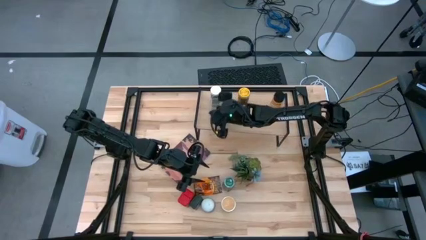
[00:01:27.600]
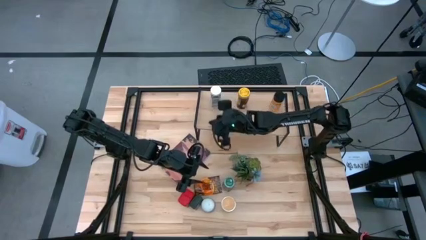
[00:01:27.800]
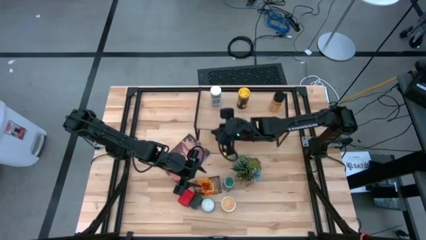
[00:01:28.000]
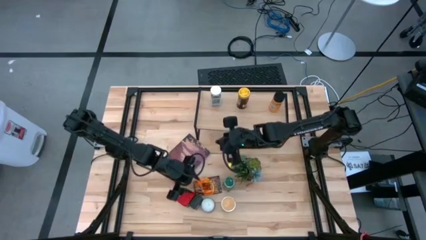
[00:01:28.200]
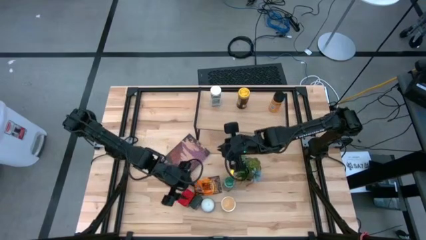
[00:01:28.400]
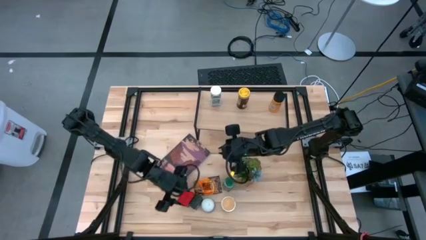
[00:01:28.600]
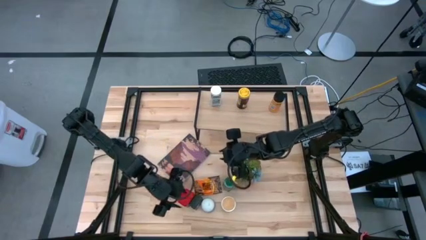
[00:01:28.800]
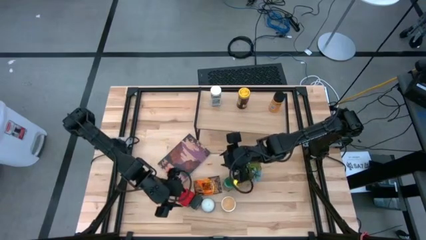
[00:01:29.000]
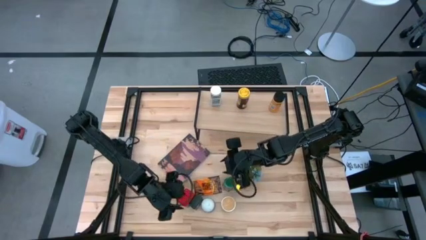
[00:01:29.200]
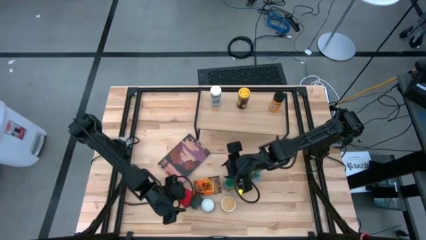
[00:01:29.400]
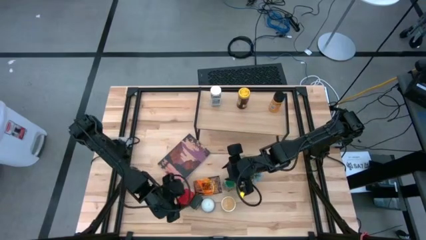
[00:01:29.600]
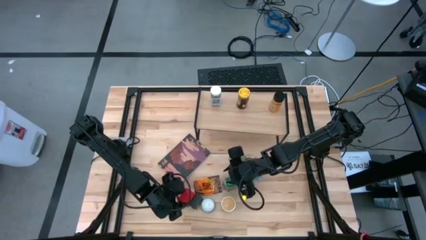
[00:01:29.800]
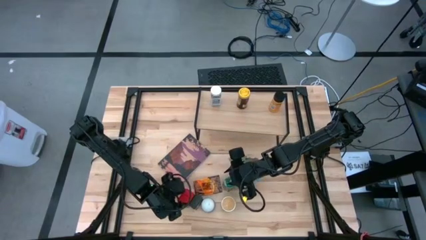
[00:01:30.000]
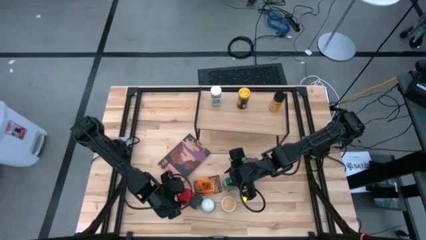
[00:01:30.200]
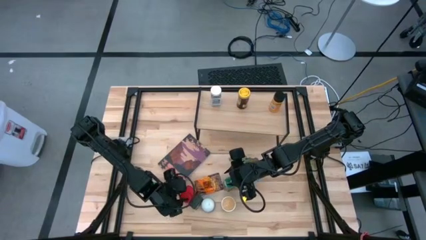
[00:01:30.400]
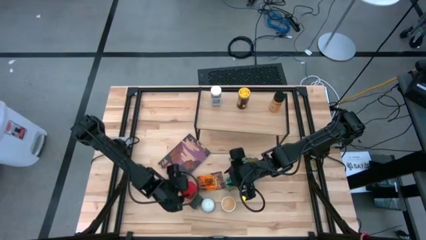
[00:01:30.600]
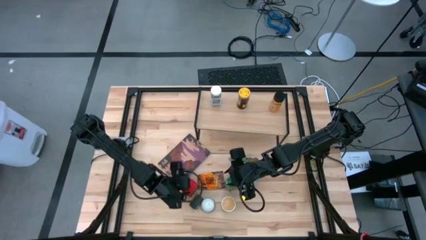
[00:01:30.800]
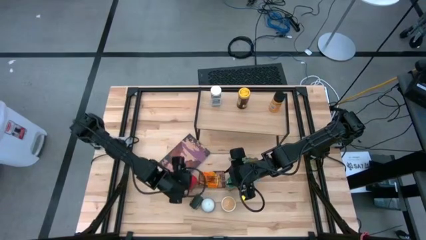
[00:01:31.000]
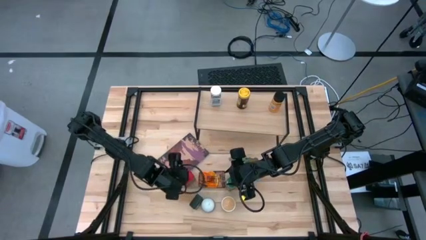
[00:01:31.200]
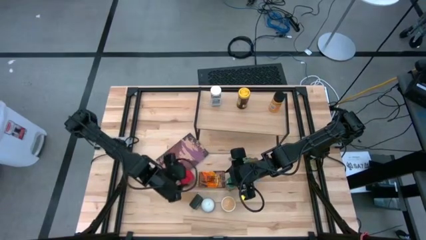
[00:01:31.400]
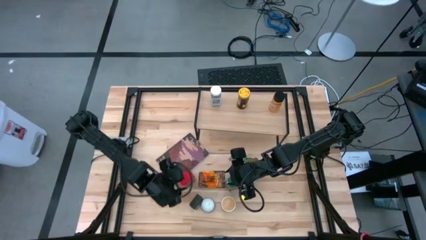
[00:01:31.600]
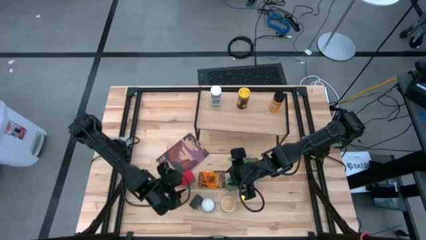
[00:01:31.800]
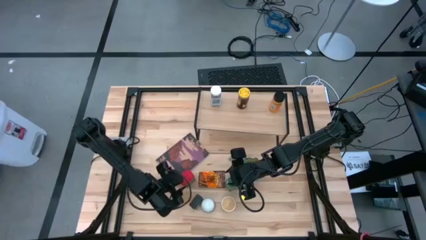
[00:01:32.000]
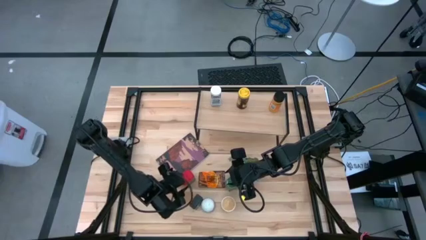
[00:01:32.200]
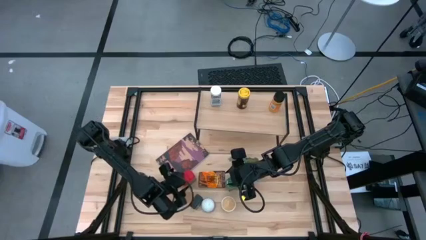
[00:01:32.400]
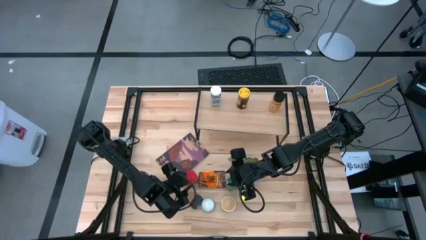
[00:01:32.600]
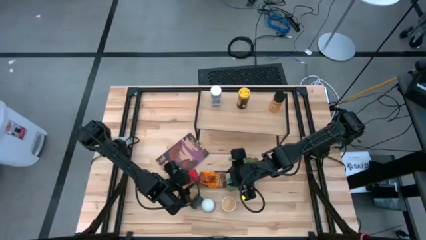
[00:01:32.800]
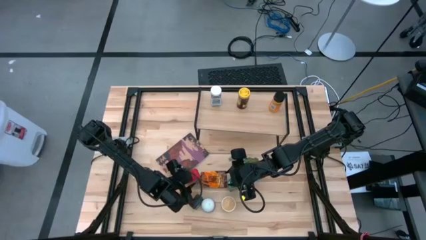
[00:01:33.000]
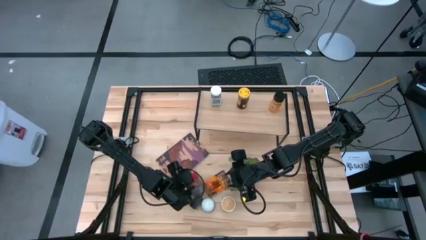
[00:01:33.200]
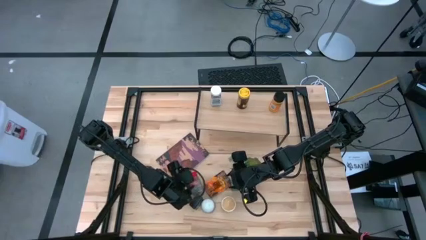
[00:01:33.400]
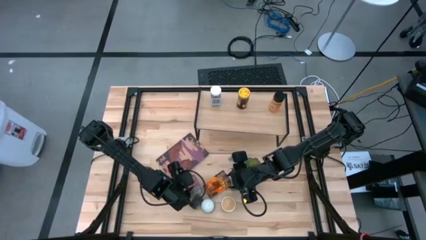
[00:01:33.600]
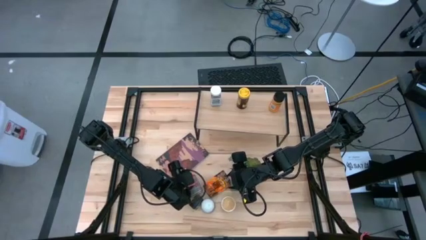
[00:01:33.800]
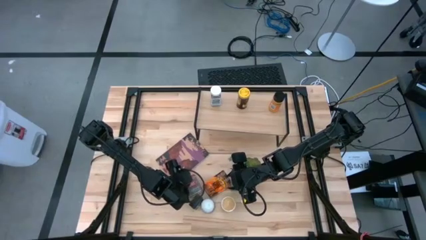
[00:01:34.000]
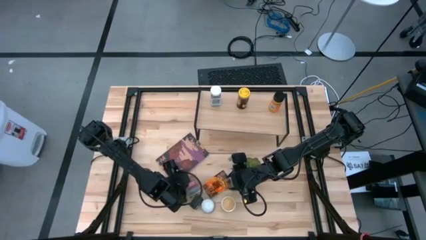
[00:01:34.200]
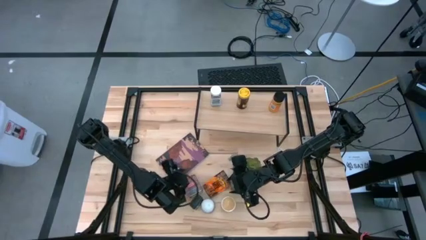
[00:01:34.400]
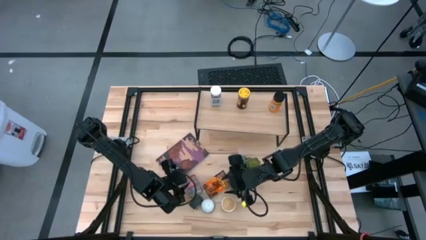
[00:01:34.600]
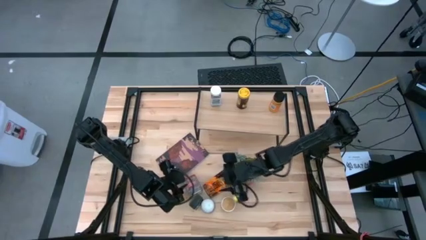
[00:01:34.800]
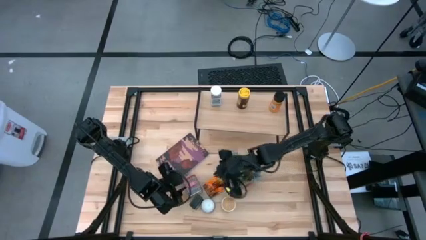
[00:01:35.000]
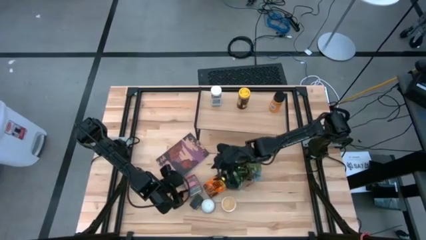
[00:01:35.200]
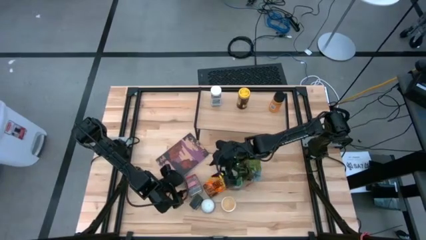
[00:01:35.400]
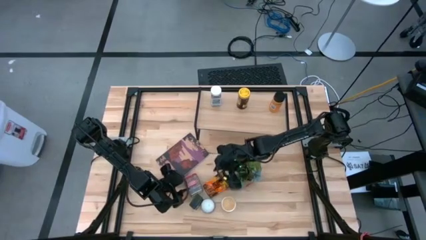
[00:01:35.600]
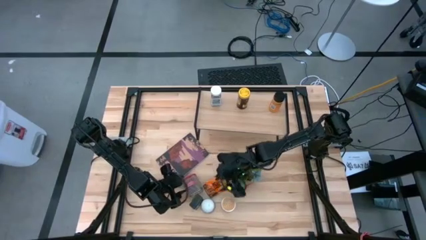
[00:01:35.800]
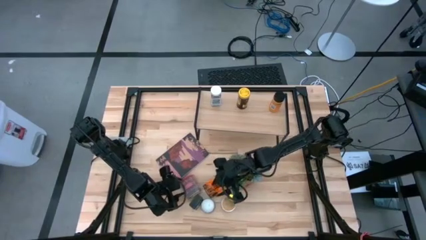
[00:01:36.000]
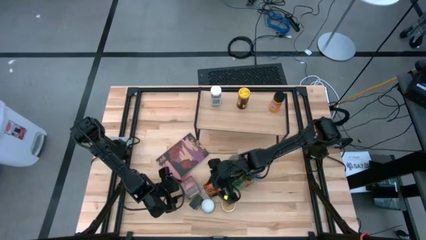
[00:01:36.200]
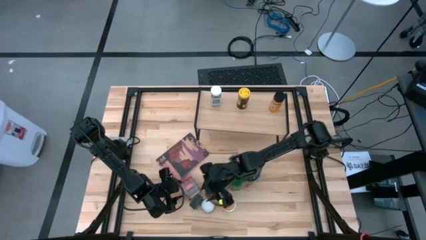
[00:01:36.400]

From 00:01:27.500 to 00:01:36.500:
Task: Shelf spices
Put the red seasoning can on the shelf

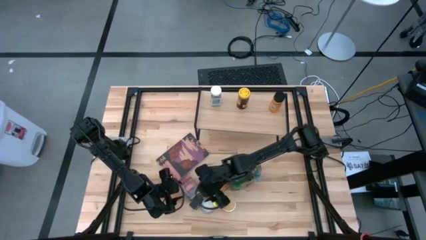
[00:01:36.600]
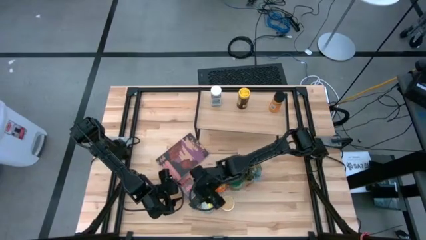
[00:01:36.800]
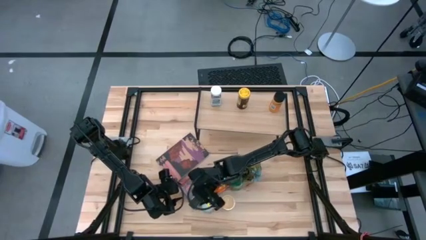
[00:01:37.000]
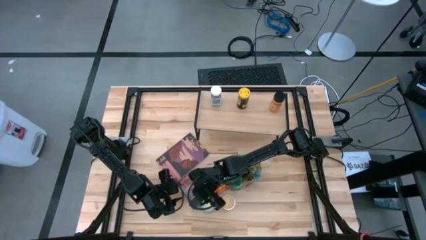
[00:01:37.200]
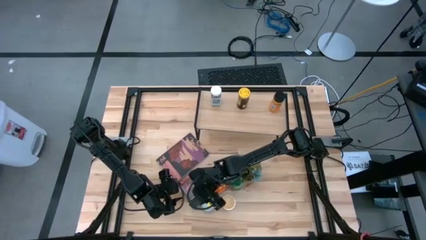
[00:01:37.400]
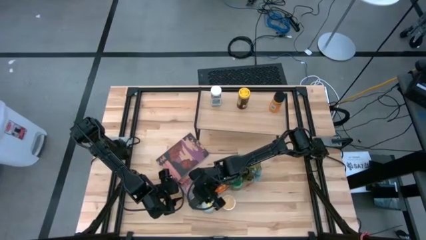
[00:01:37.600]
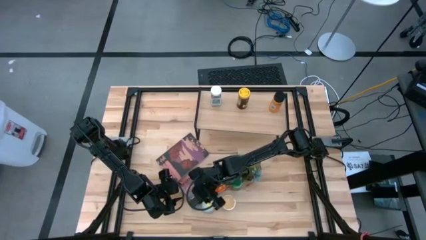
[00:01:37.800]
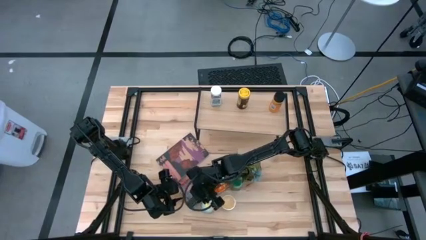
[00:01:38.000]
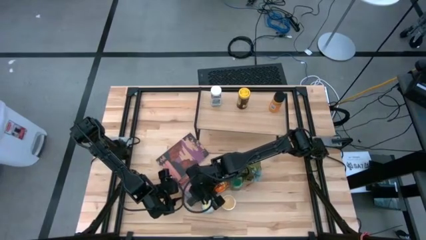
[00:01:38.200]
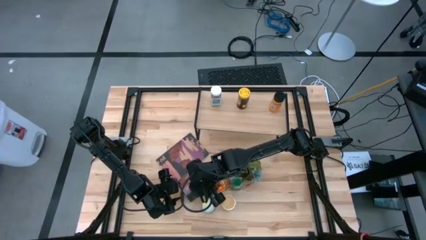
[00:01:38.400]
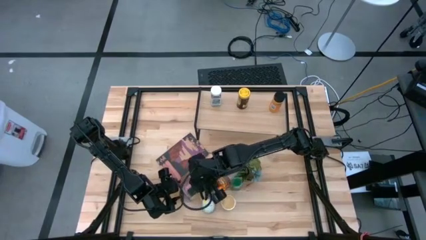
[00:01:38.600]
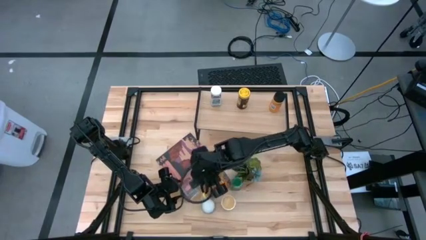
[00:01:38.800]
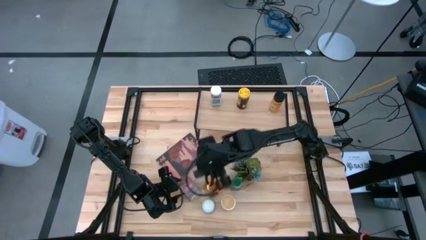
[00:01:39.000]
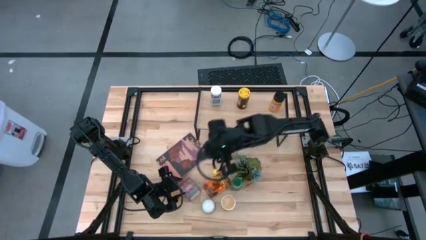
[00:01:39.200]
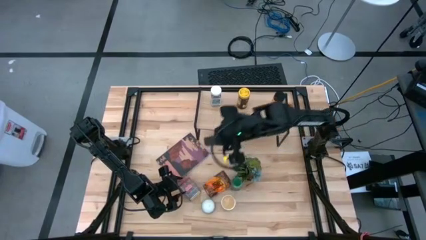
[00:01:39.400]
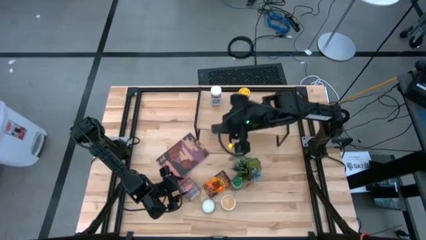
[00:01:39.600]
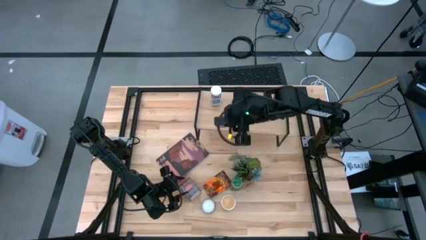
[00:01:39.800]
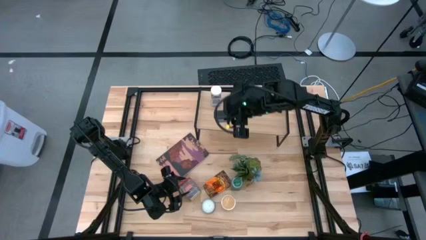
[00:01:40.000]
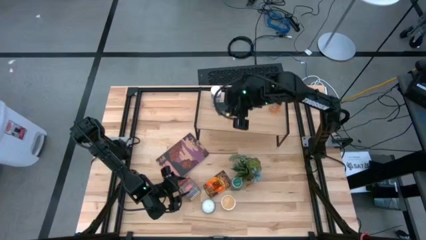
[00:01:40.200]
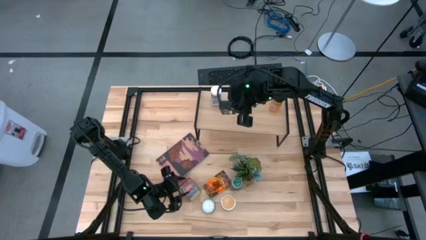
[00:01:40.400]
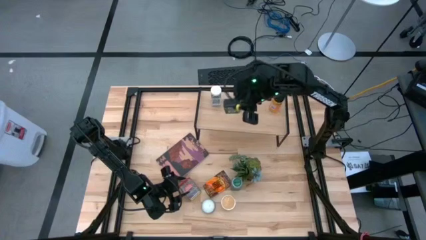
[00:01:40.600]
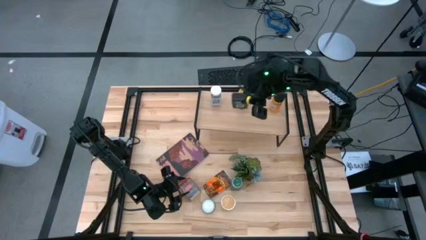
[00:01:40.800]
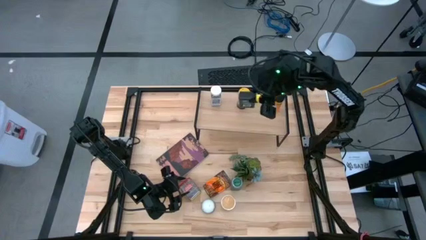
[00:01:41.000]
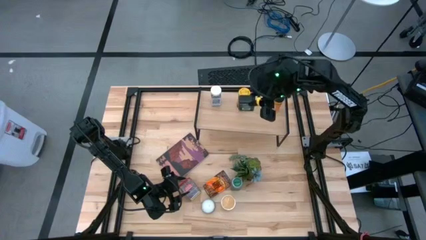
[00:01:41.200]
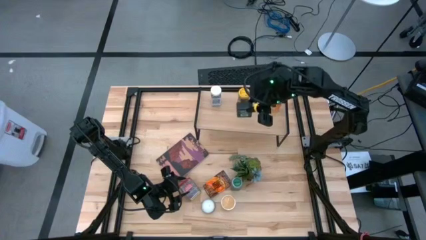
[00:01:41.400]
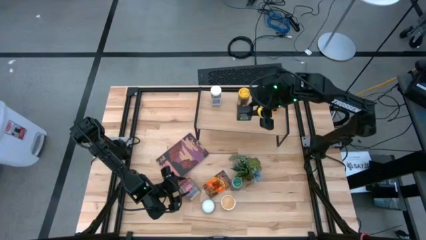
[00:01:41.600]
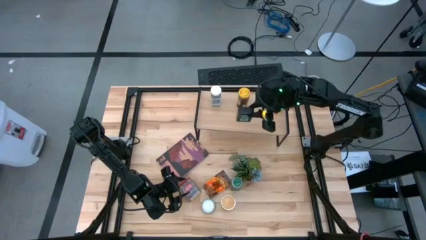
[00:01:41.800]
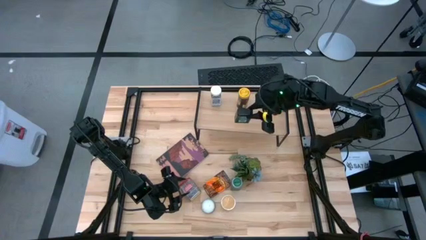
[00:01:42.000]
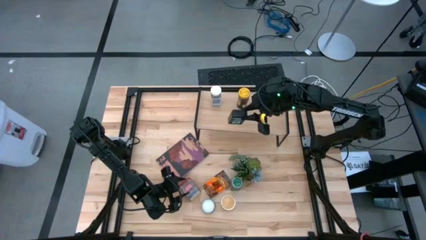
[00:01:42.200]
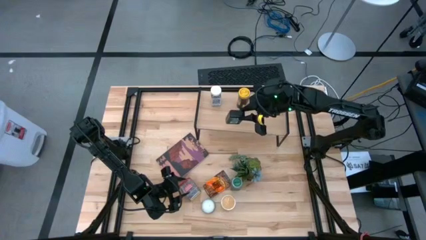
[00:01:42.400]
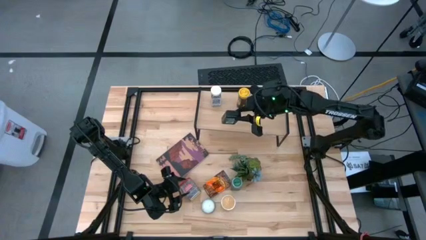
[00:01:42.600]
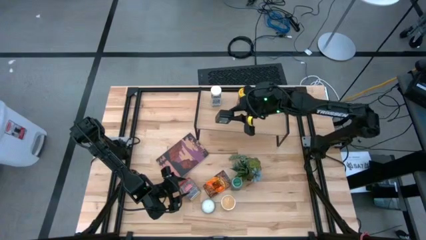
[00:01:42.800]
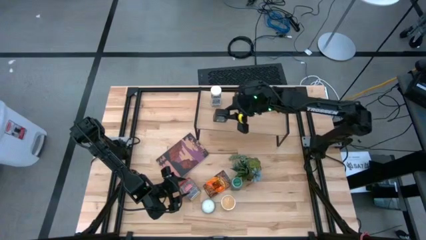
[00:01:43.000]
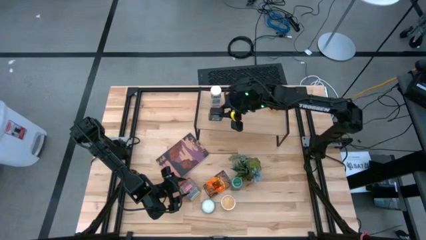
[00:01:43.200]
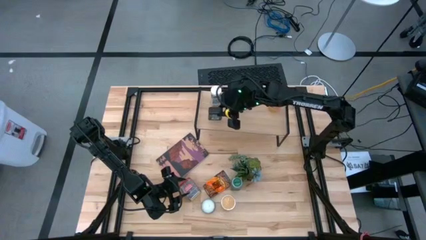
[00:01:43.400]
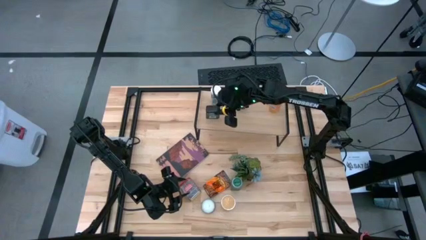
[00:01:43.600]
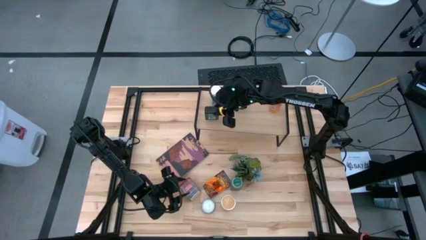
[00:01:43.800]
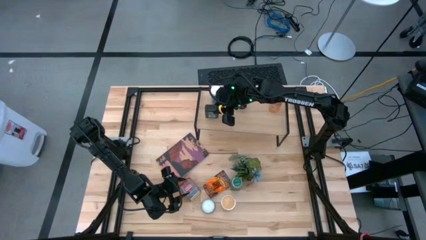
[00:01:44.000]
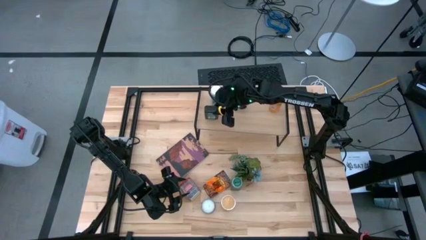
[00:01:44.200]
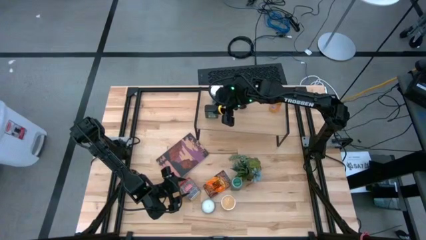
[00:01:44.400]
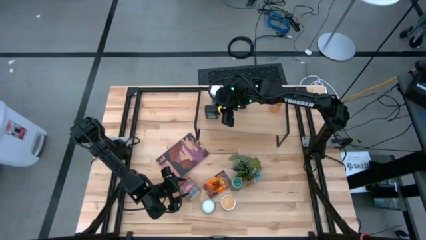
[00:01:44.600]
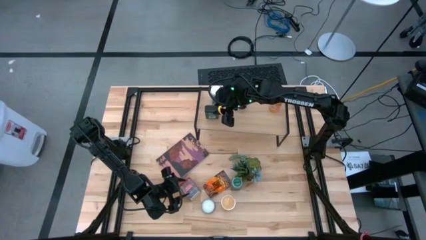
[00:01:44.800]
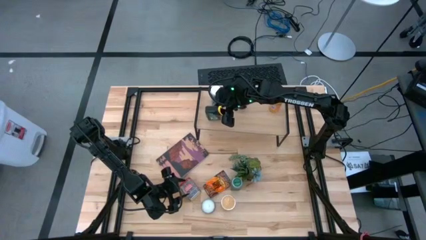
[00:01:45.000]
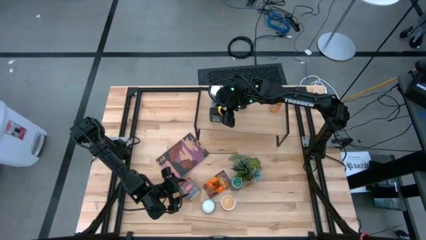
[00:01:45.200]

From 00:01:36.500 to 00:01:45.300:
Put the black seasoning can on the shelf
